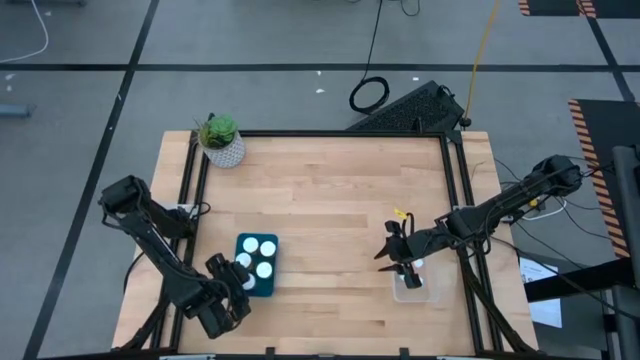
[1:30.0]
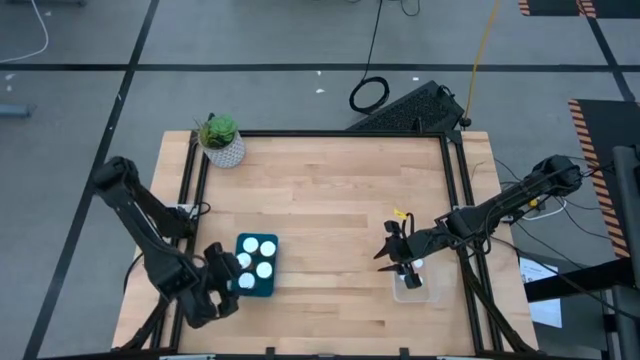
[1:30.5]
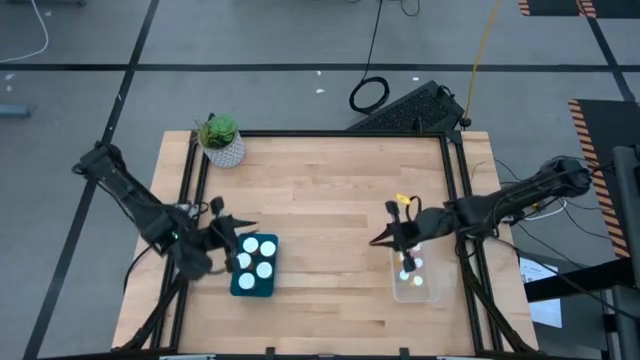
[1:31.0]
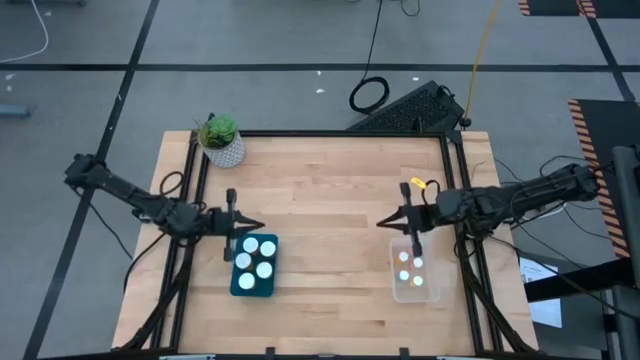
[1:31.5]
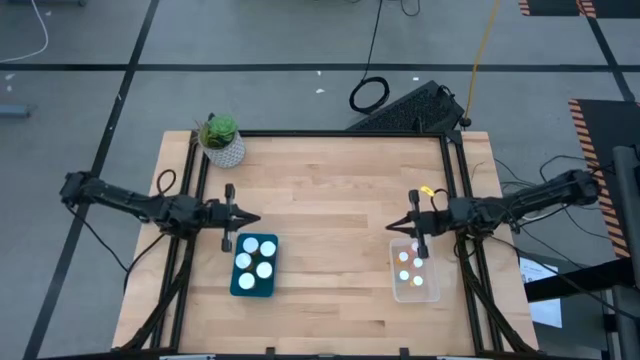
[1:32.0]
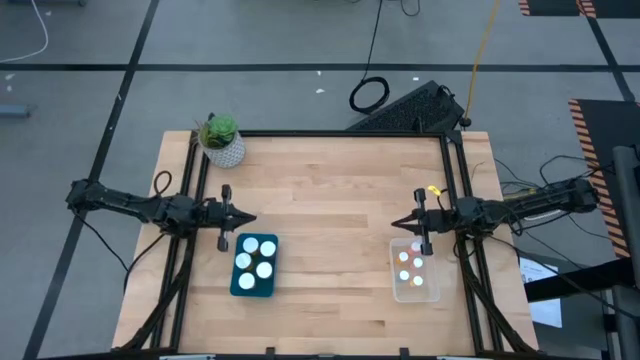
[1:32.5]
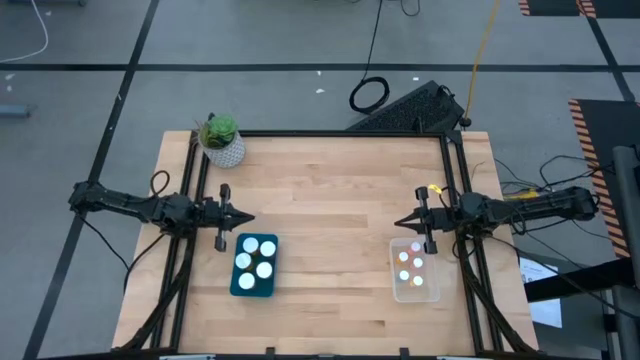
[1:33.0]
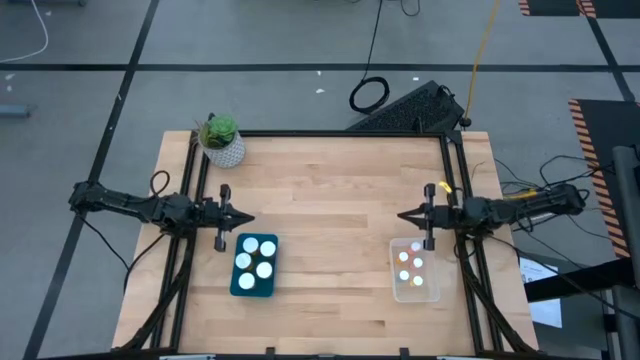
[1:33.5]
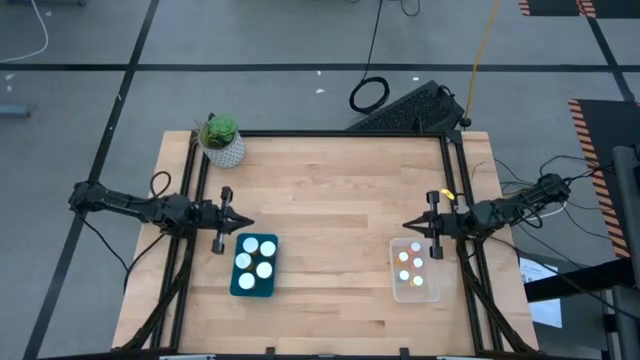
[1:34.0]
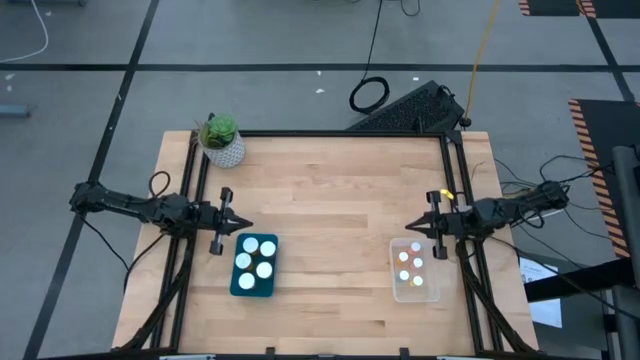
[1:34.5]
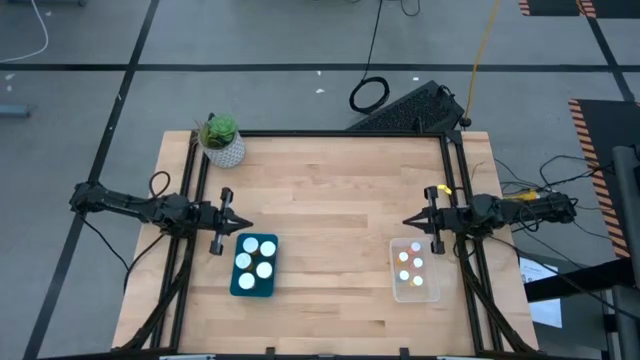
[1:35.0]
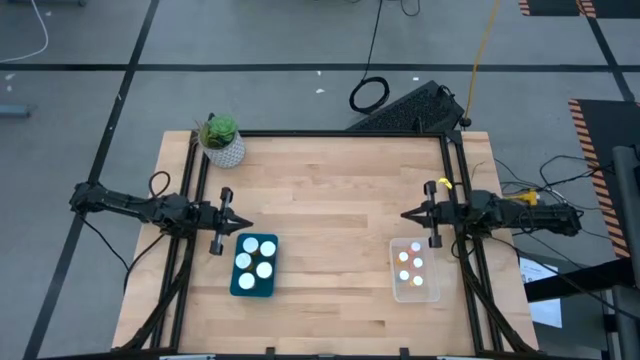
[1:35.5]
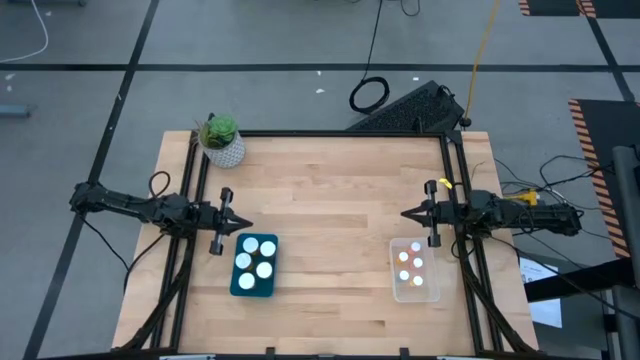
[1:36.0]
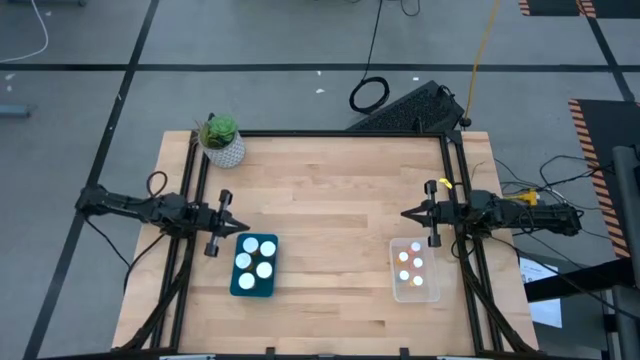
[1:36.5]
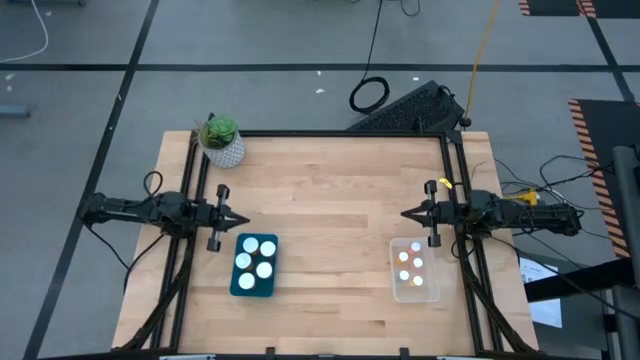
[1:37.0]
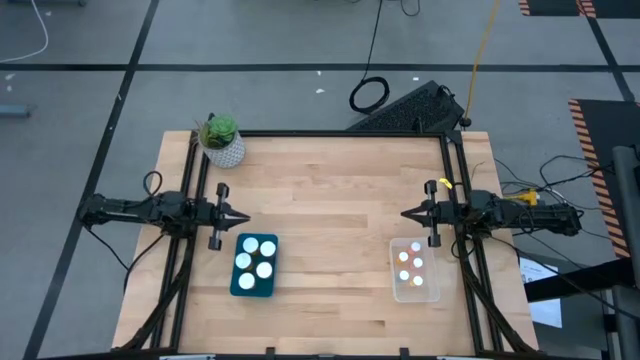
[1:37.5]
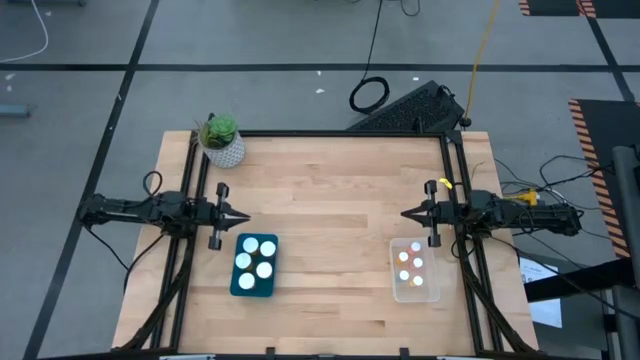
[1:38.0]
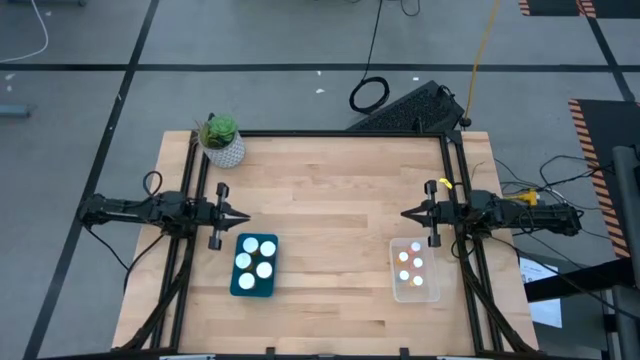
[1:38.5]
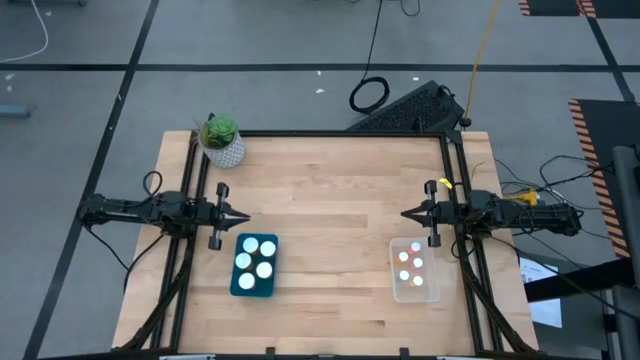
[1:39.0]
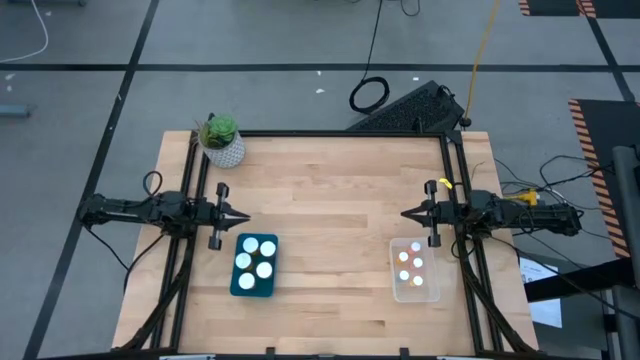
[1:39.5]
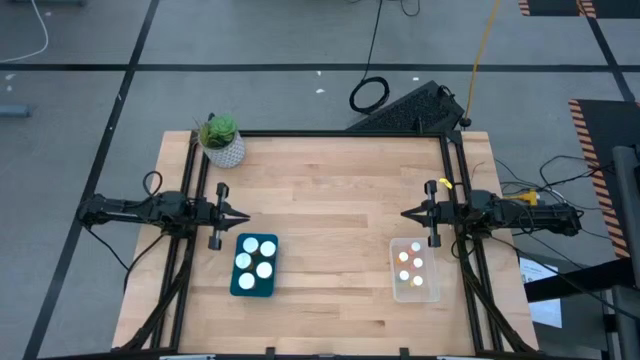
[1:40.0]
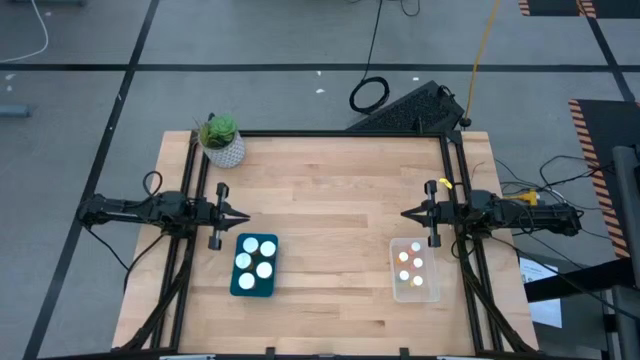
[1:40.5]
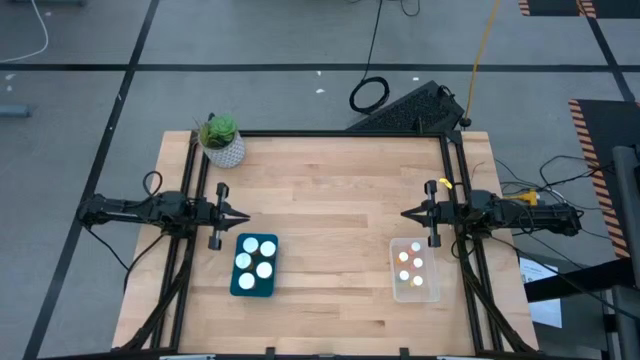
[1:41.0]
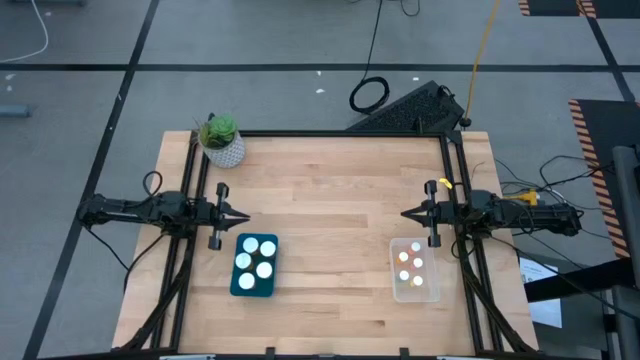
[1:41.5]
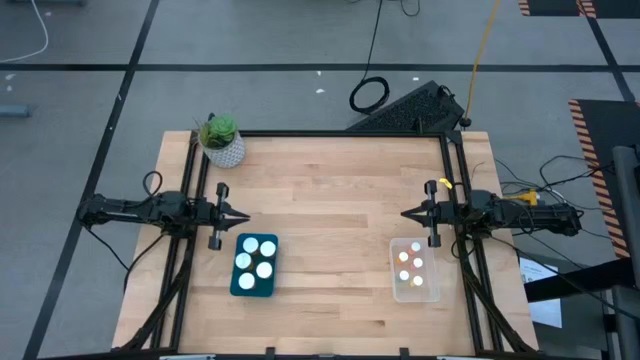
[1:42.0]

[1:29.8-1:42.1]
Task: Pick and place medicine bottles into bin by pill shape (circle, oval)
Return to Home Position

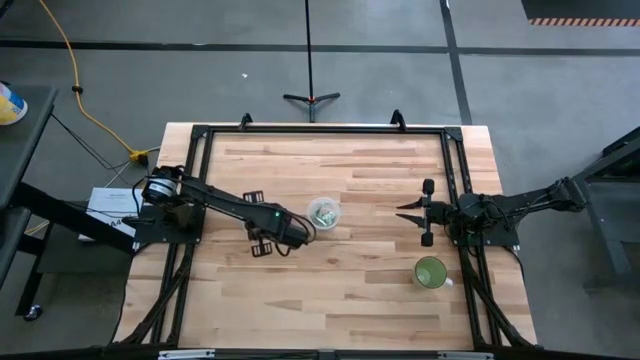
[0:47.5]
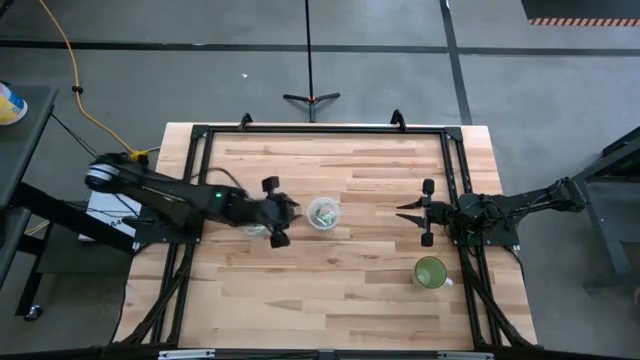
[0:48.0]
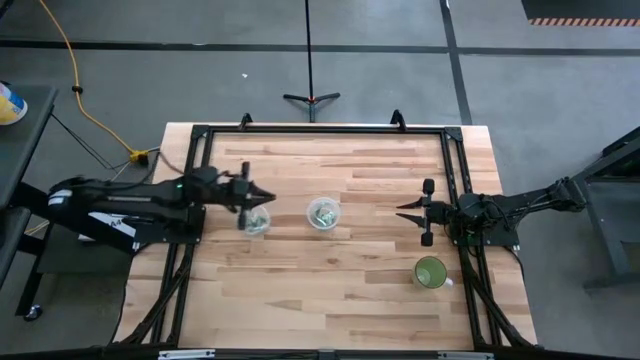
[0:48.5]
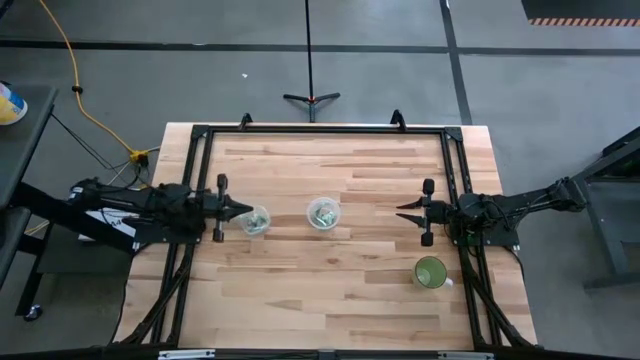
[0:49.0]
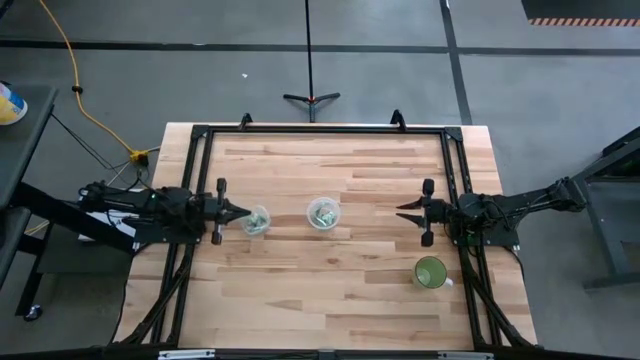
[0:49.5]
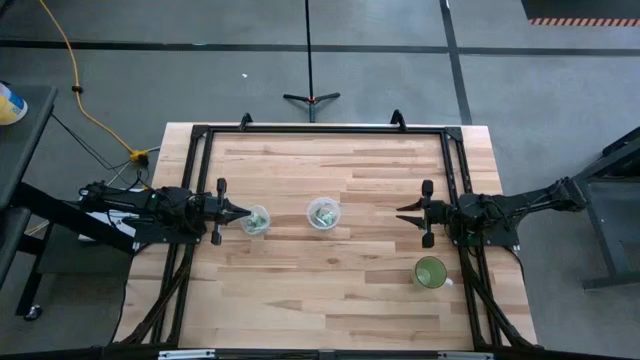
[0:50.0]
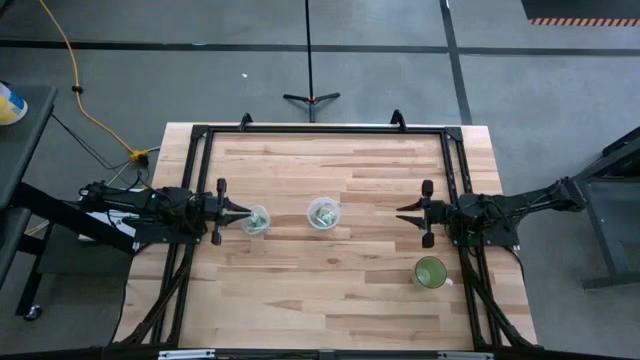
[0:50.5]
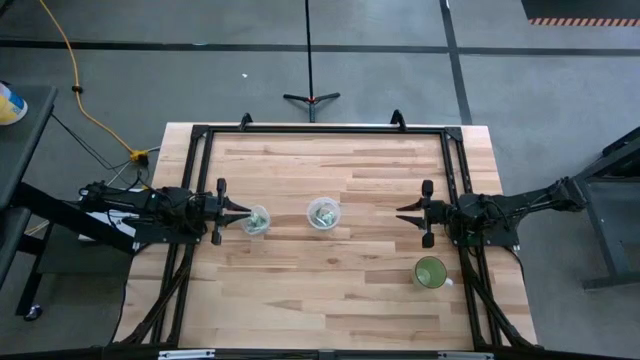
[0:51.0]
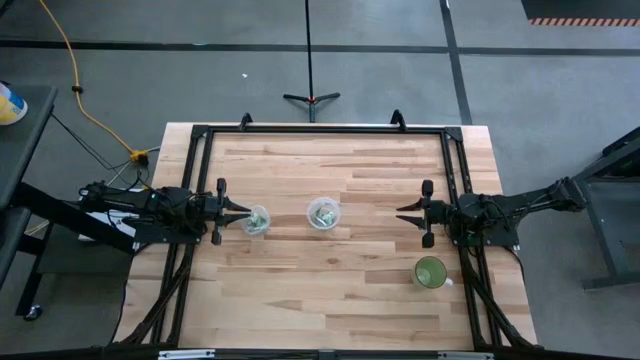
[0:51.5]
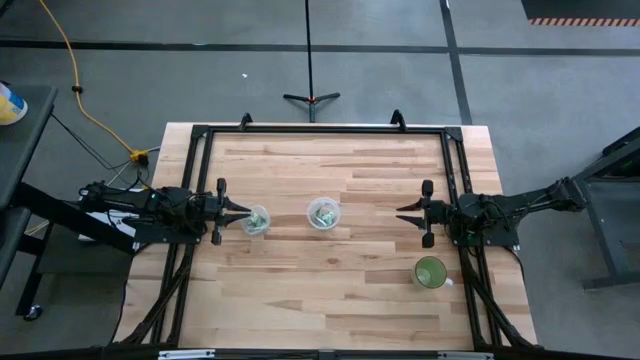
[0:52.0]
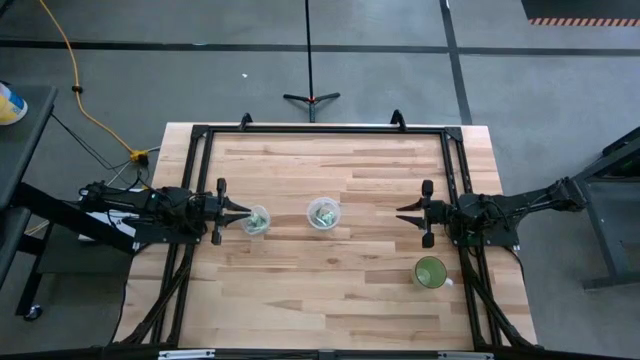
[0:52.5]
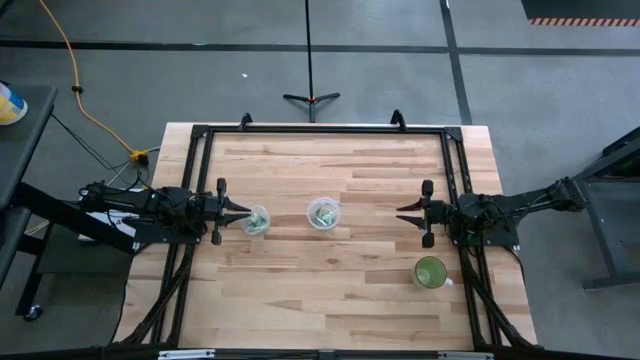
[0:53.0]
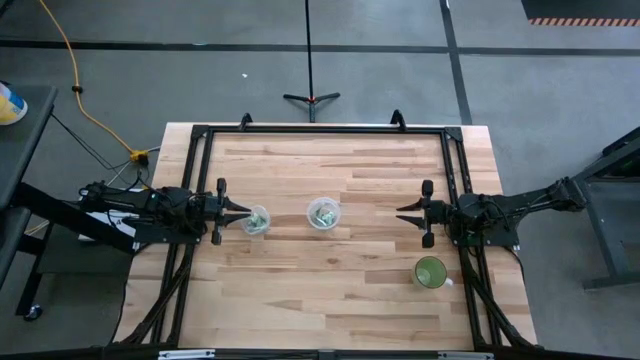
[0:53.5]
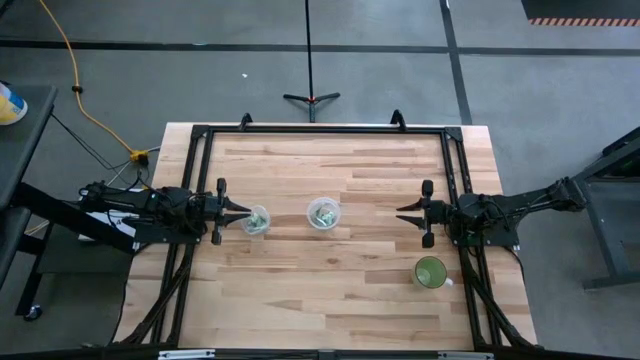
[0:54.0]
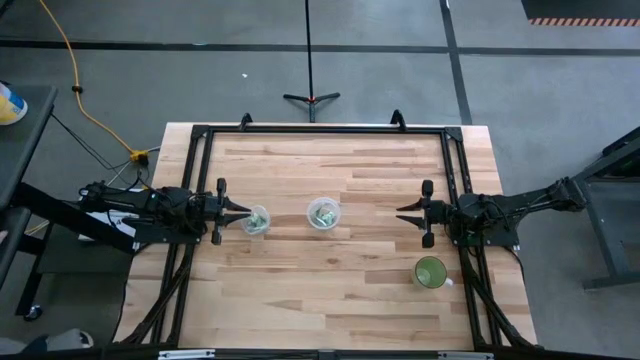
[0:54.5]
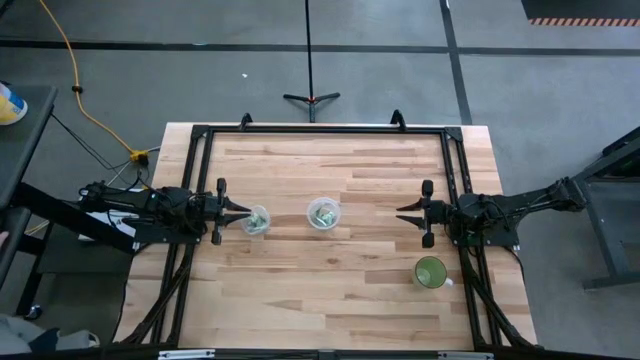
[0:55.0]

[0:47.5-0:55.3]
Task: Pick and place Stevia / Truvia into bins
Return to Home Position

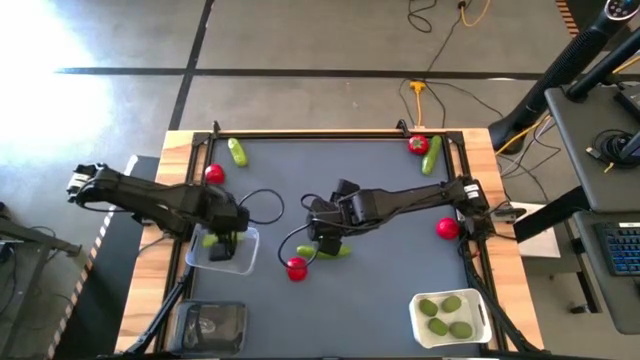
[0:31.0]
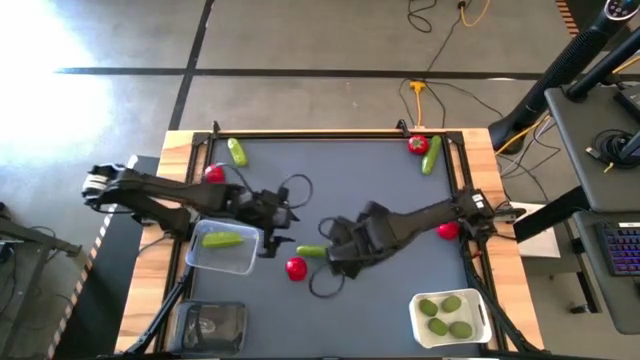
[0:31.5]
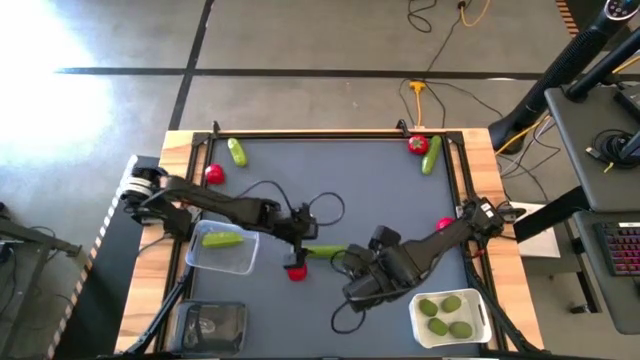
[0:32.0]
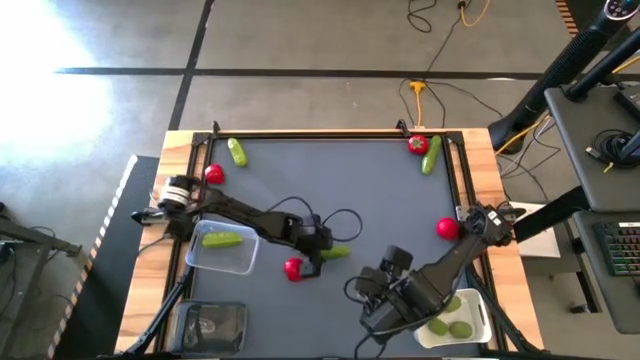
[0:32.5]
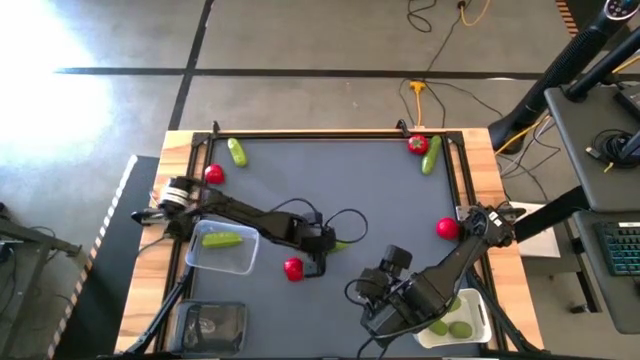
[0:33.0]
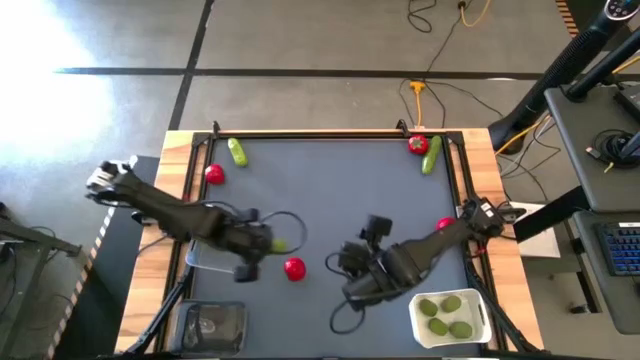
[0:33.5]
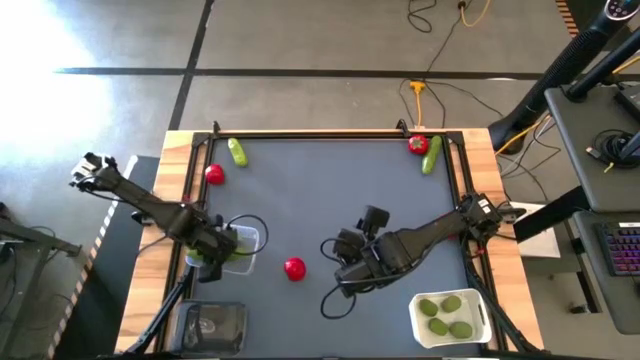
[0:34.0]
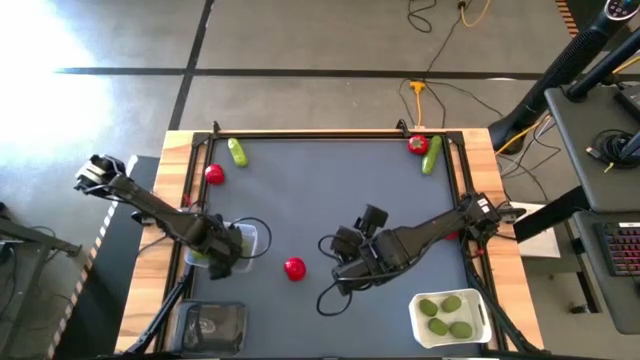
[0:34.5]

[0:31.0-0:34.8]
Task: Sort produce into baskets
Put the bottom cucumber into the transparent bin
